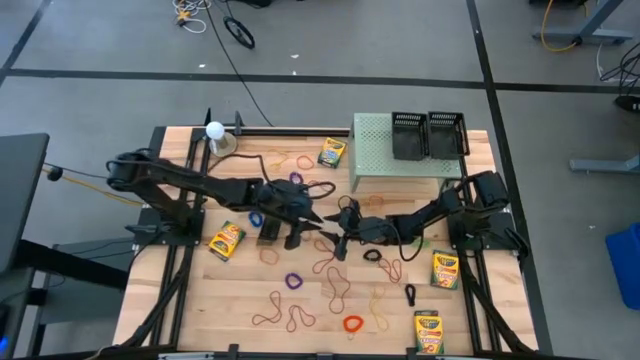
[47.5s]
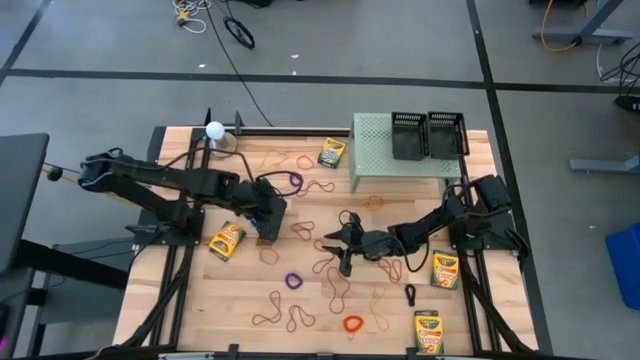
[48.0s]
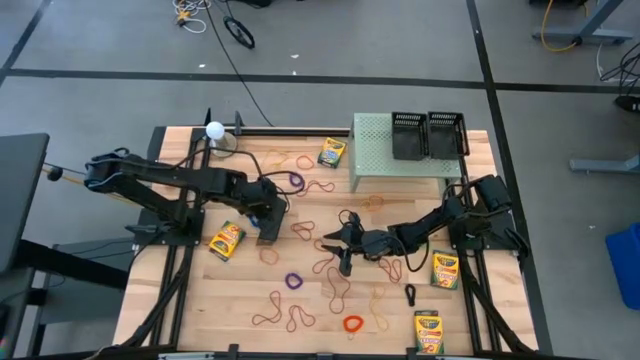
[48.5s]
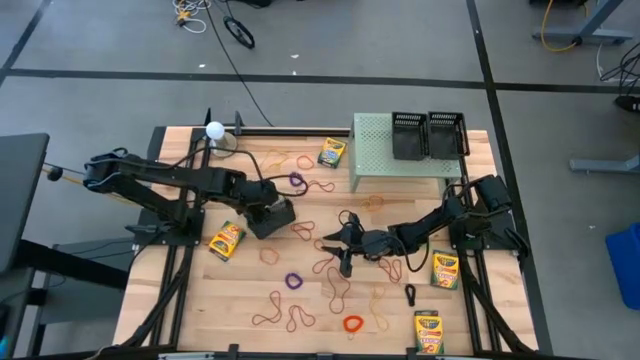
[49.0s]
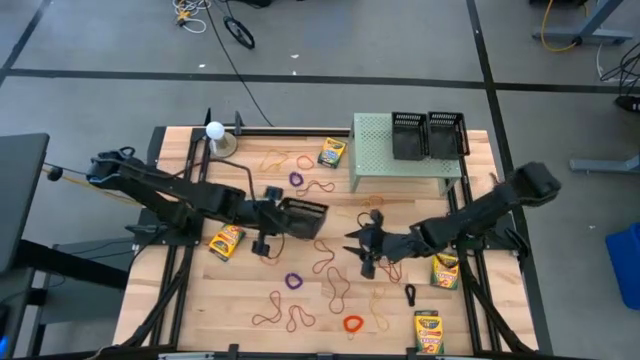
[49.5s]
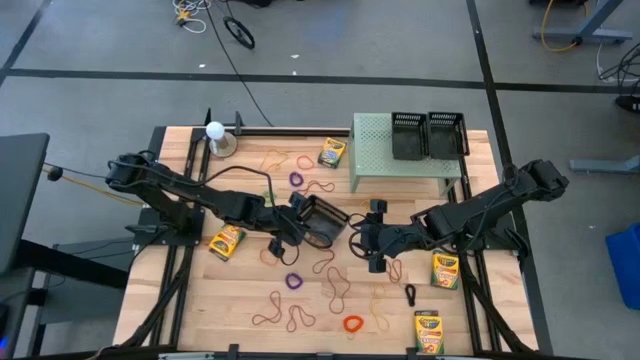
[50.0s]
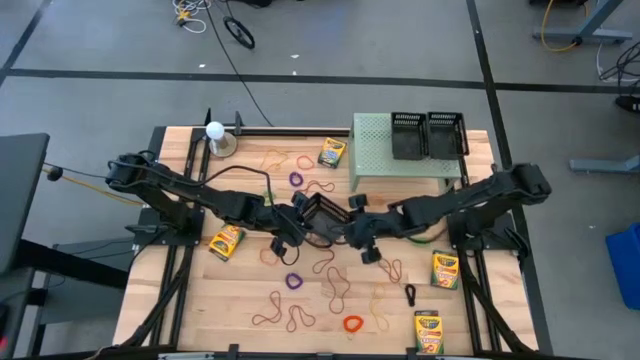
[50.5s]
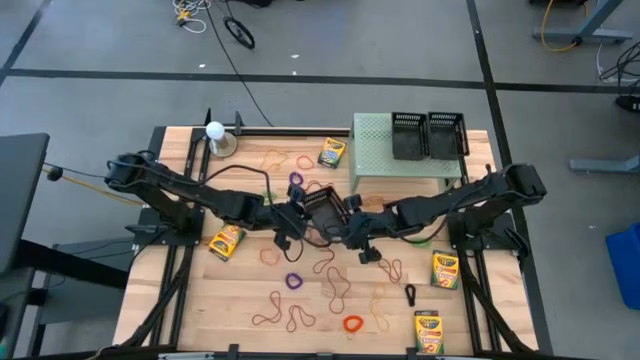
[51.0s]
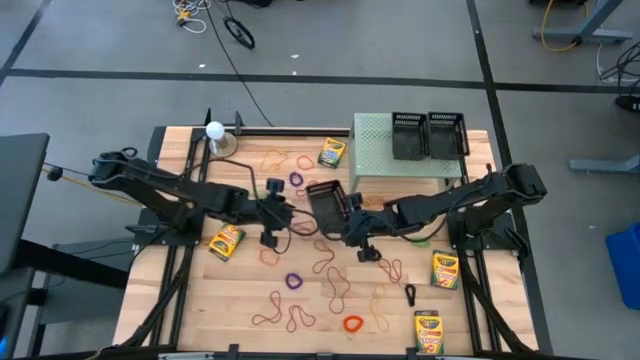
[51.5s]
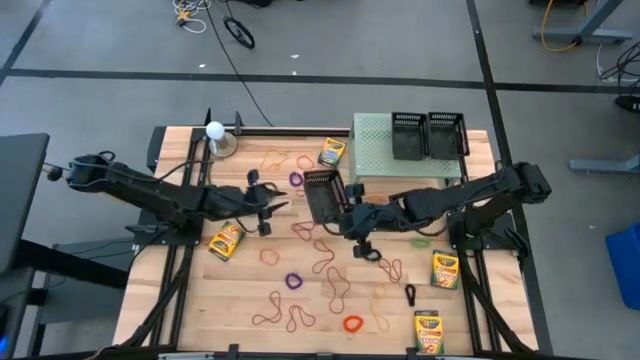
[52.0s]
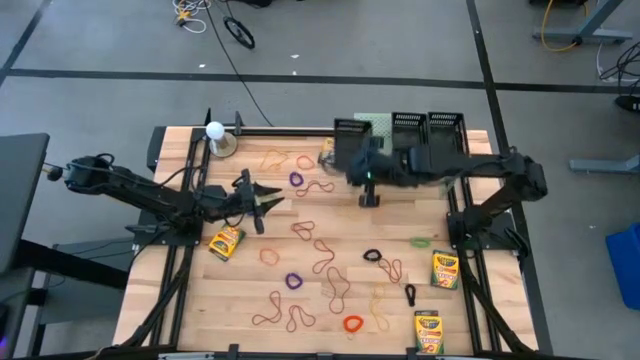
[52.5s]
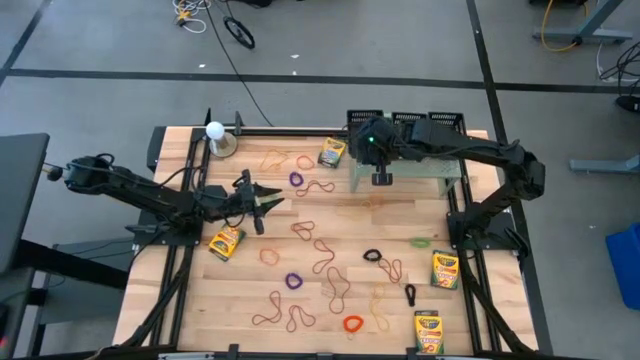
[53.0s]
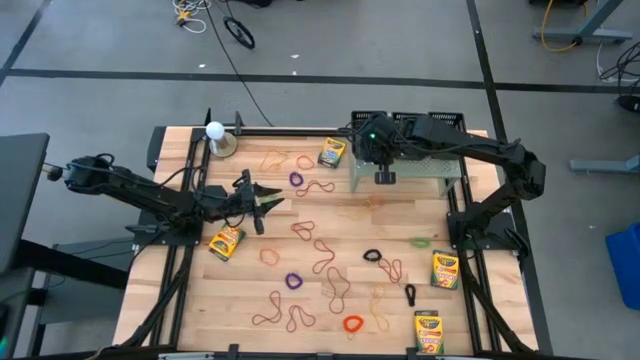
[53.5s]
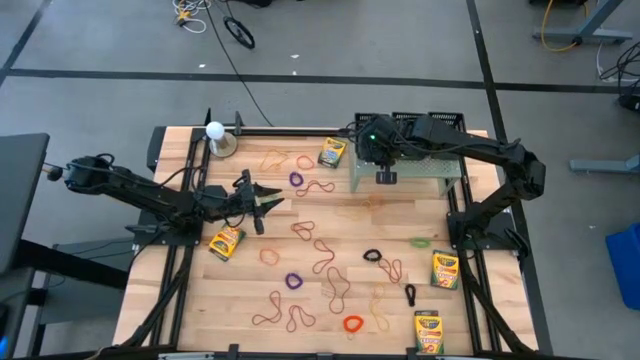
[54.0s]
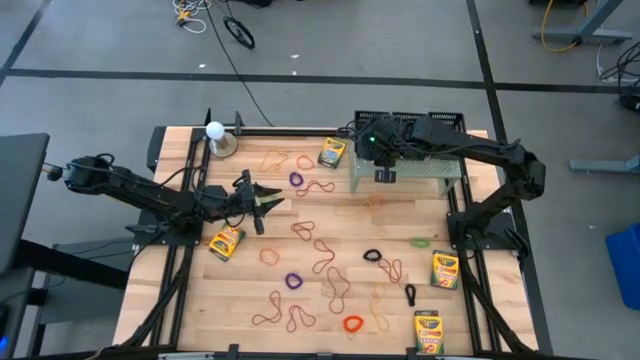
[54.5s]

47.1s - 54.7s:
Task: Pick & Place Office Desk Supplies
Put the black basket on the shelf

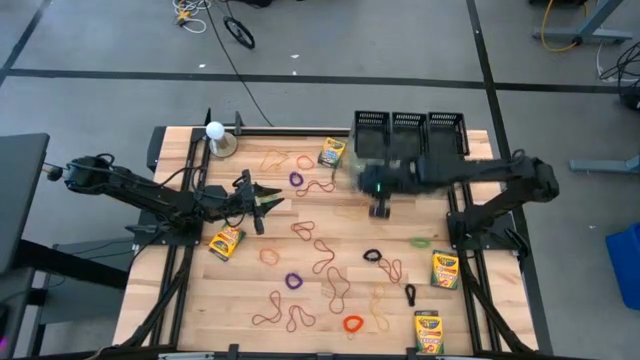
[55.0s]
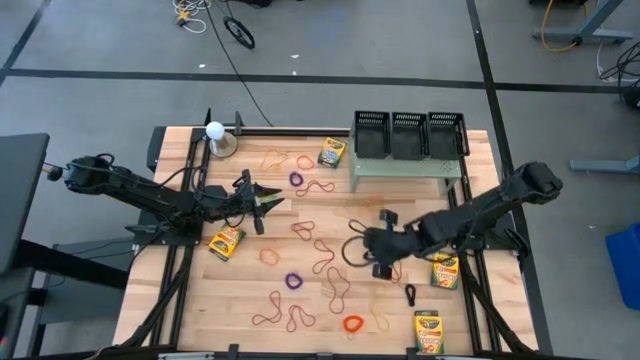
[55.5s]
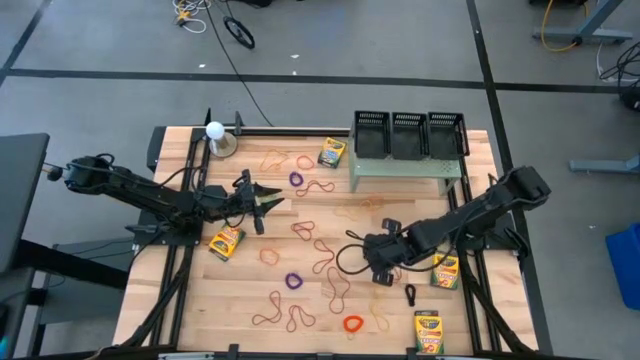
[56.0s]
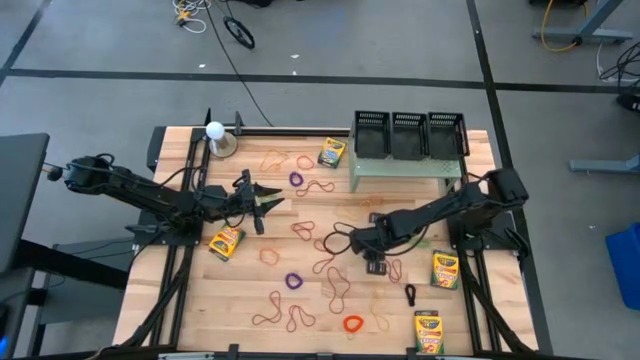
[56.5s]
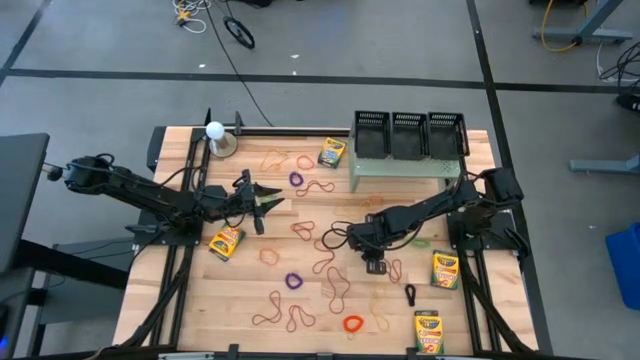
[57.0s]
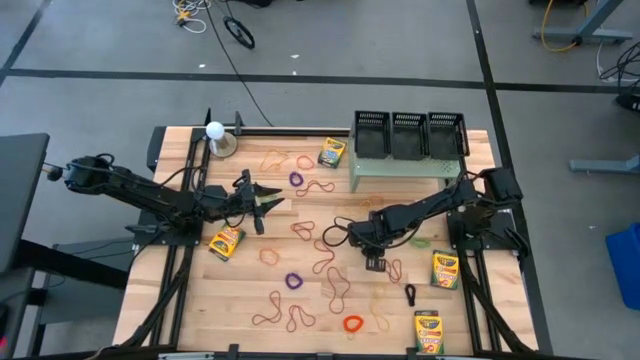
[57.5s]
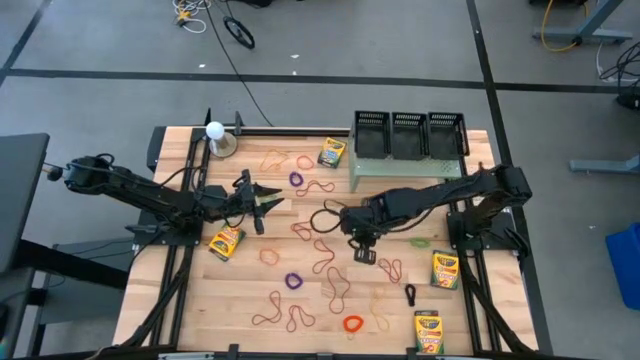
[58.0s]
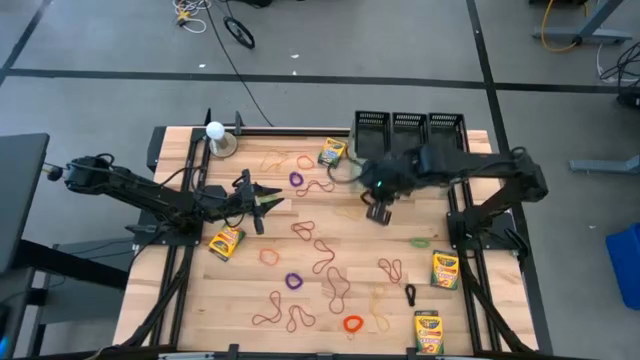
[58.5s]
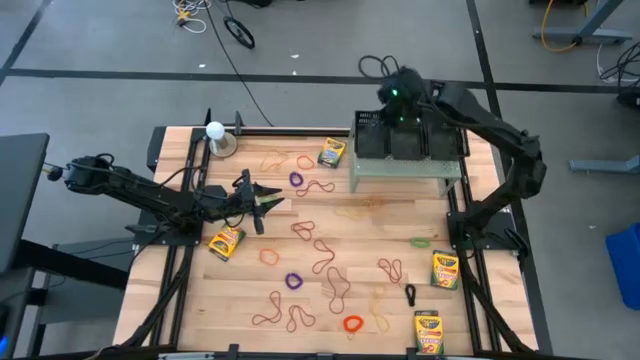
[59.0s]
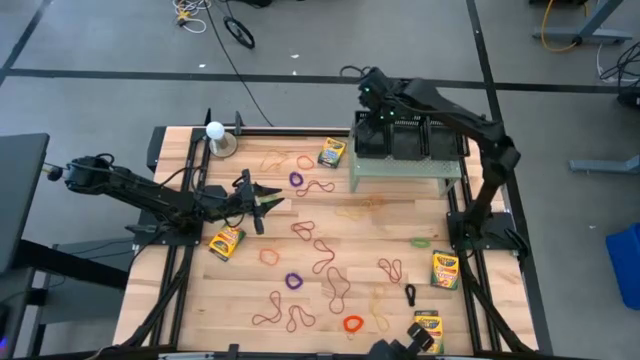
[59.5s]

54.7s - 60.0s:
Put the top black spring keychain into the left black basket on the shelf

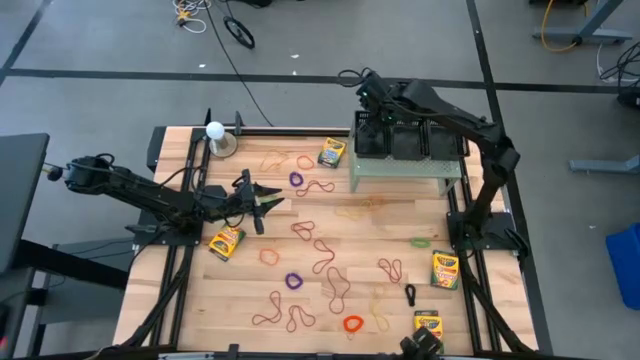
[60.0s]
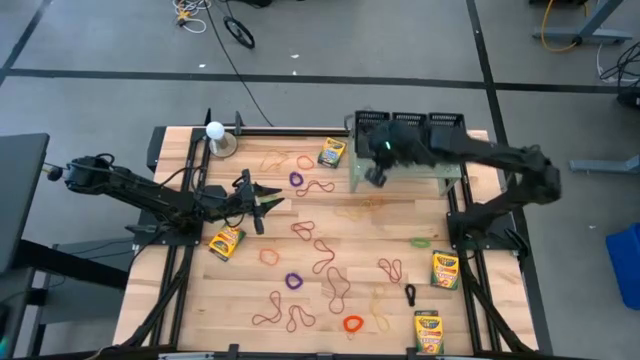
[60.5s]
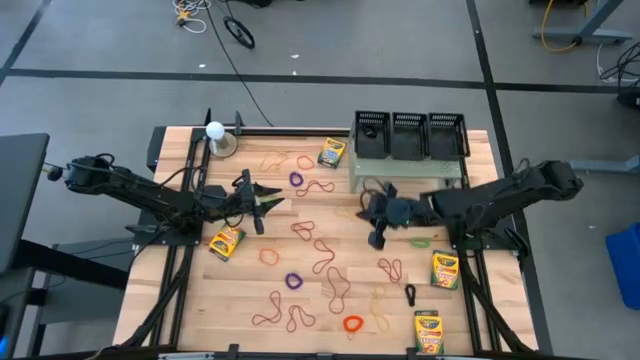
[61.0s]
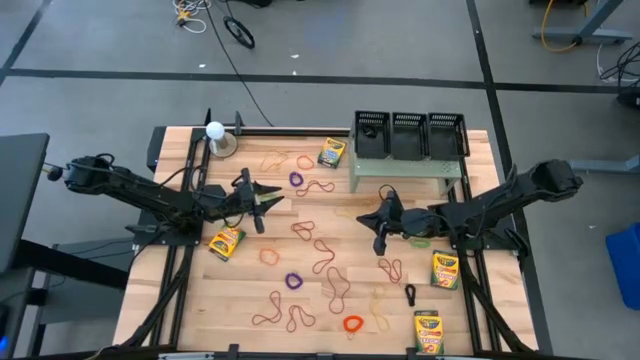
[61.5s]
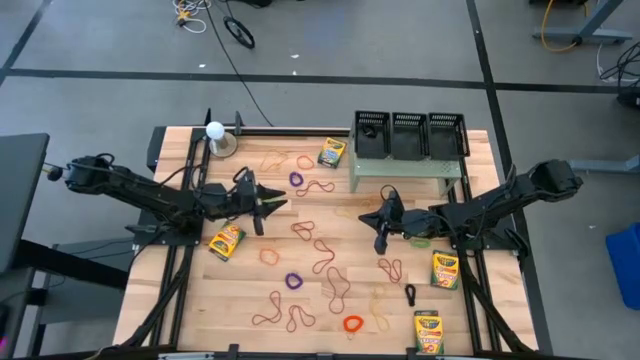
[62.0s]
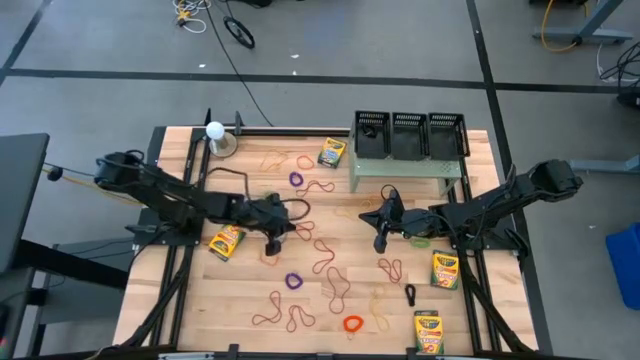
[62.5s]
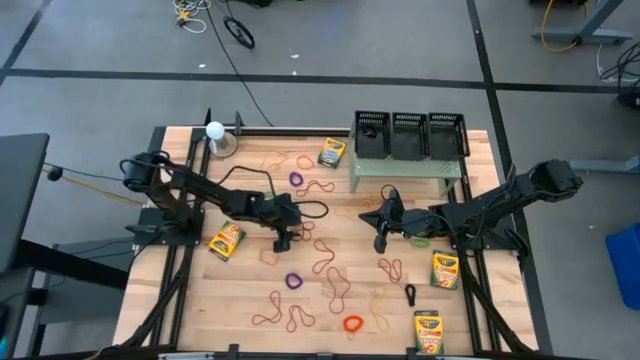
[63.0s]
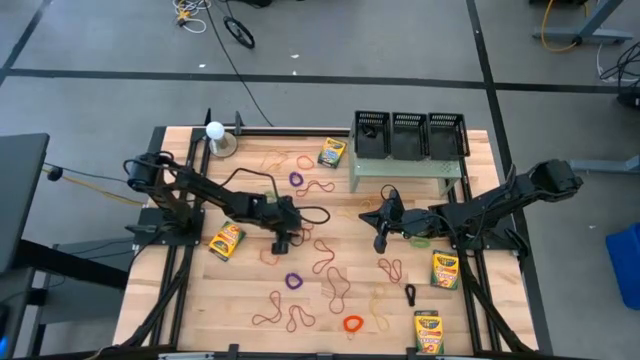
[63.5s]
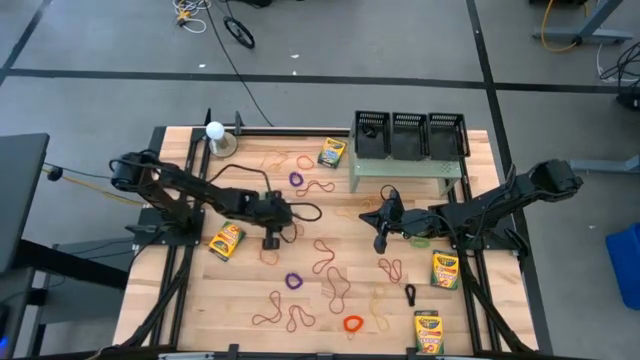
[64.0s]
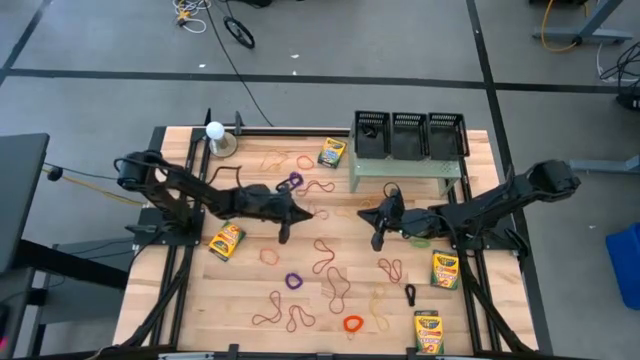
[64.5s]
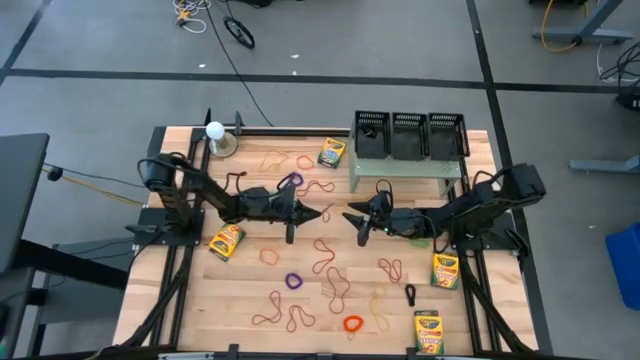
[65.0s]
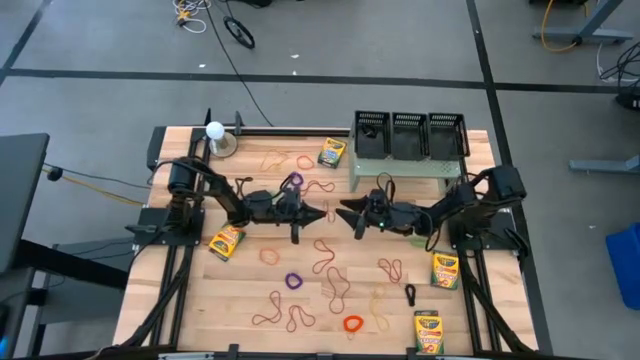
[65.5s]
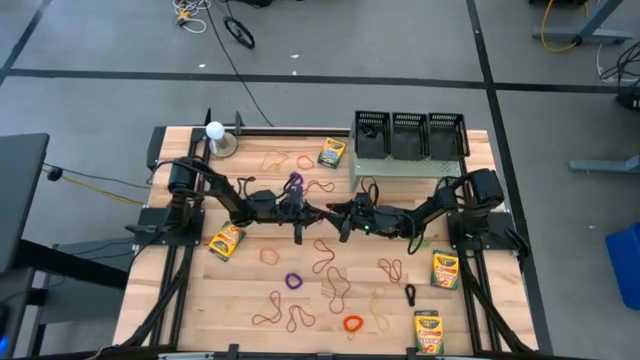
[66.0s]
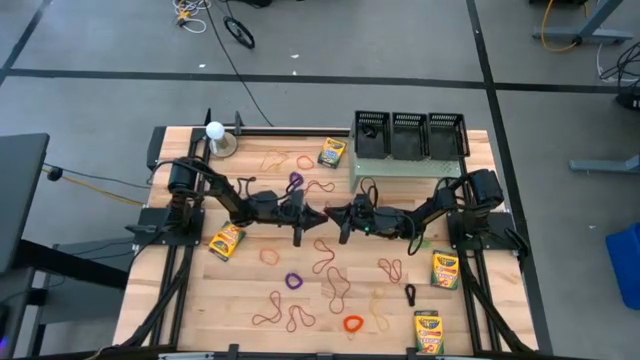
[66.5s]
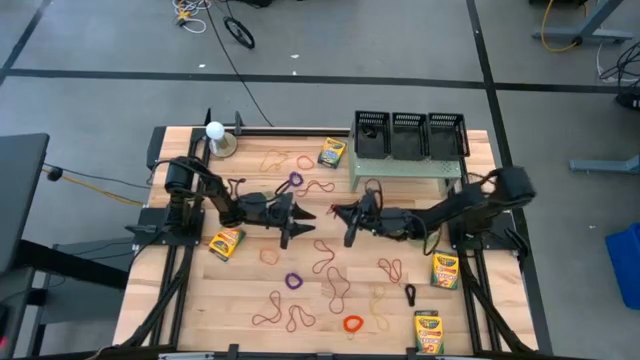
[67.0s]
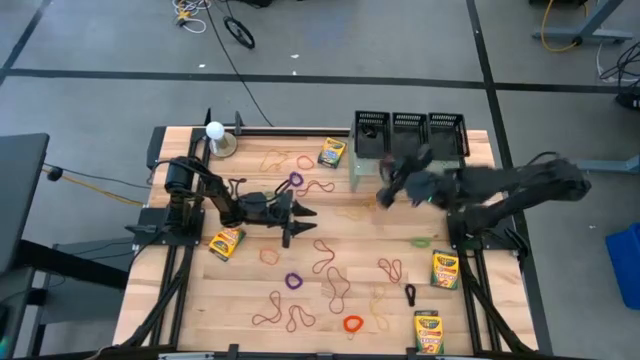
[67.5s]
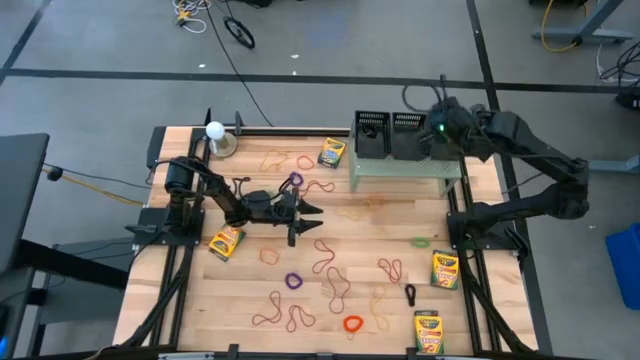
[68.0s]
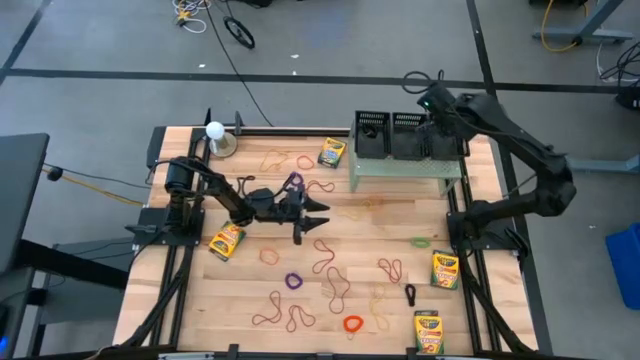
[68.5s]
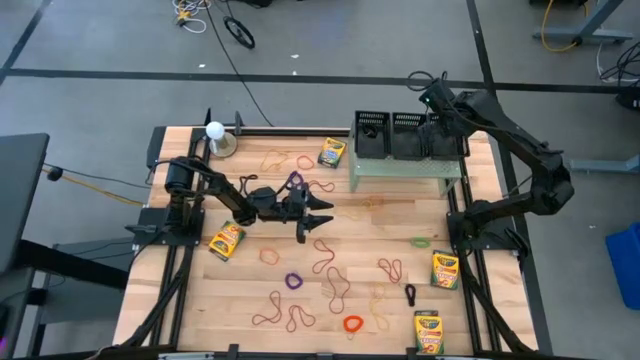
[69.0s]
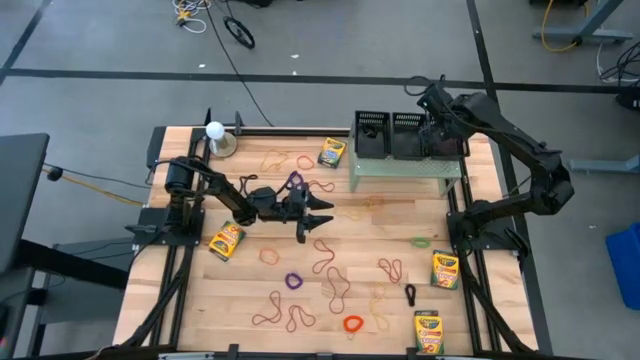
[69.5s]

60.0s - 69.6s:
Put the red rubber band into the right black basket on the shelf
